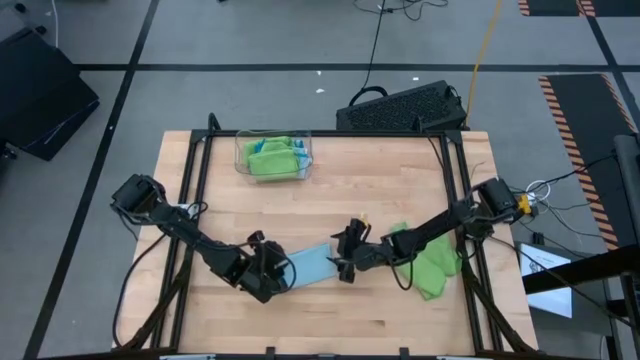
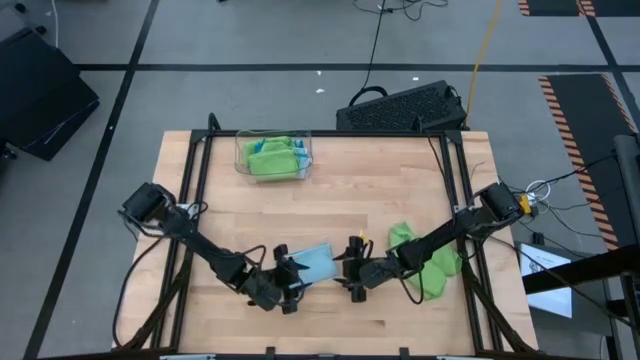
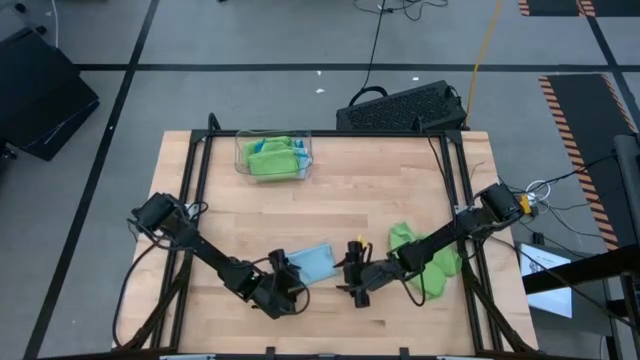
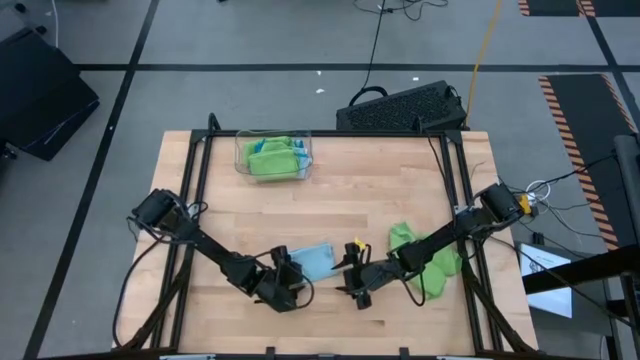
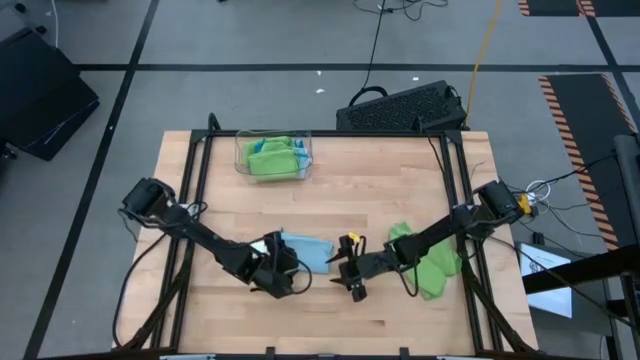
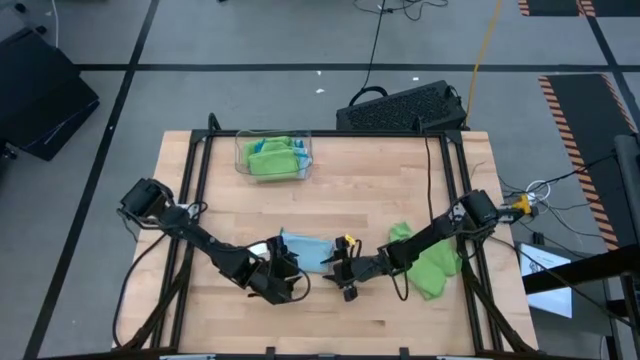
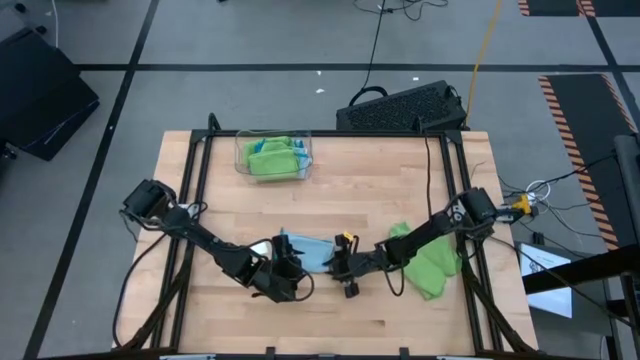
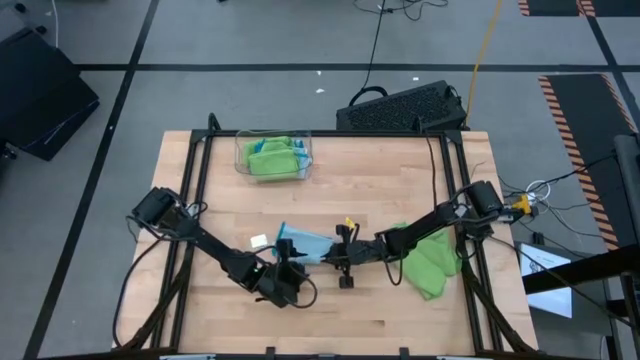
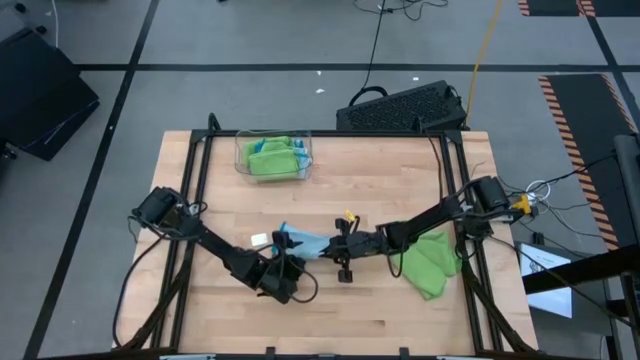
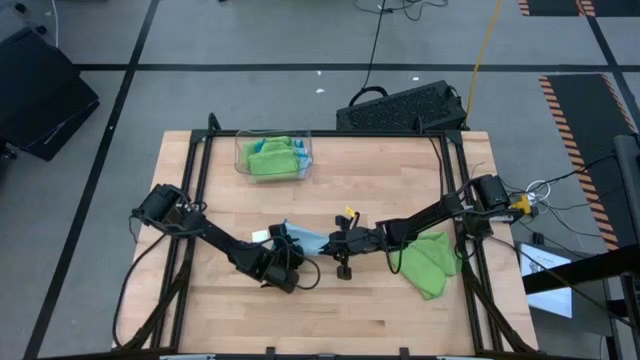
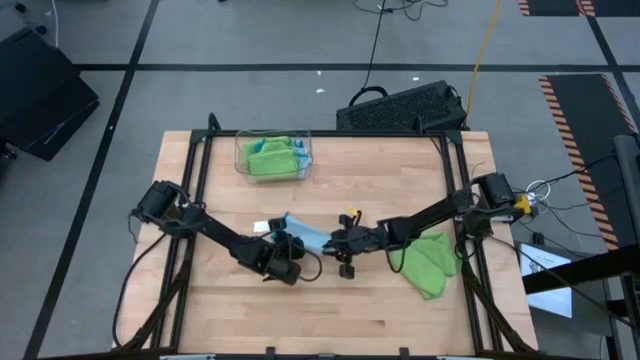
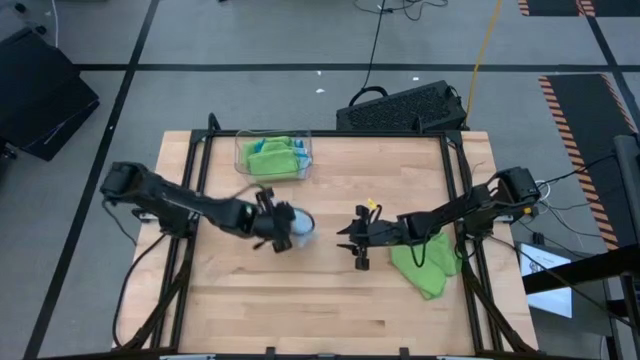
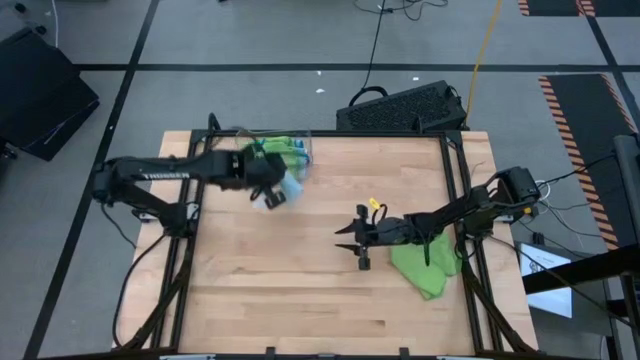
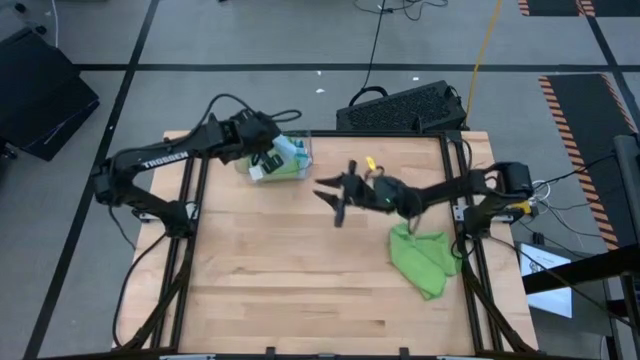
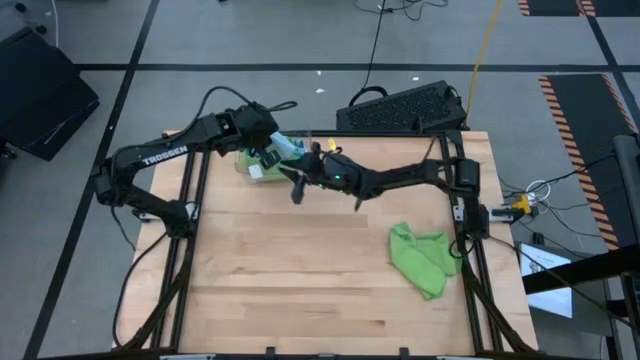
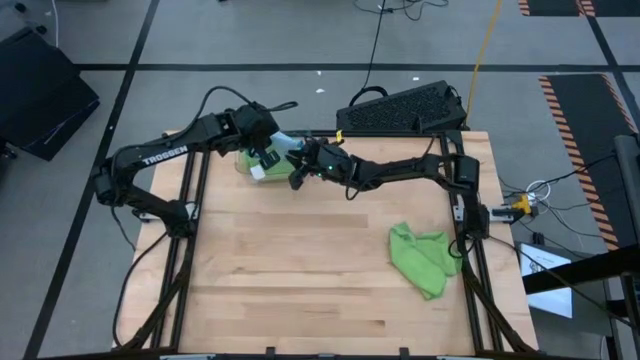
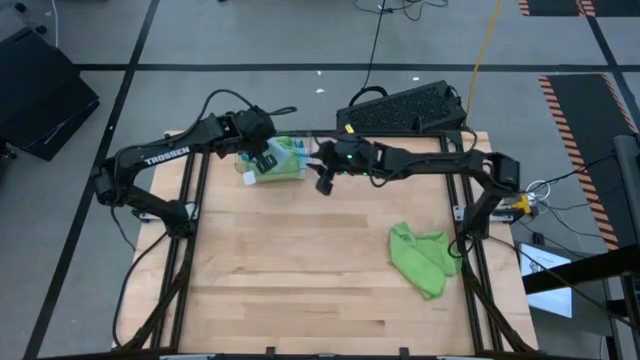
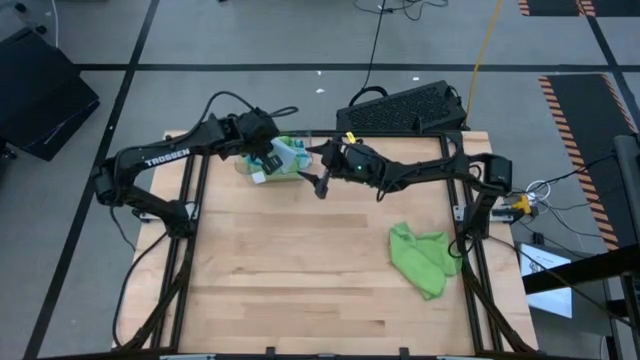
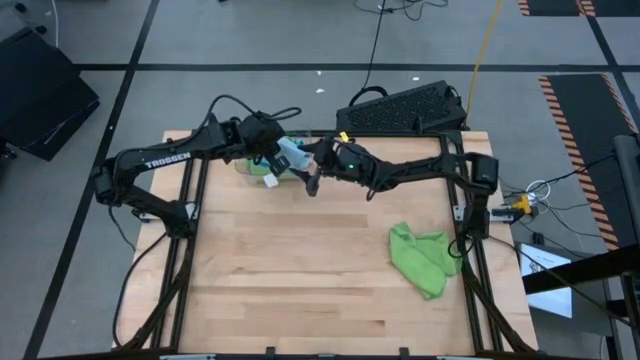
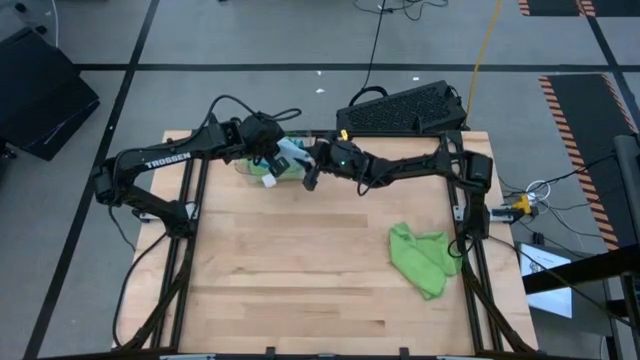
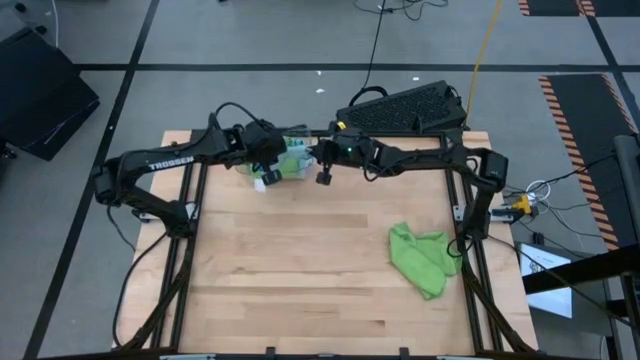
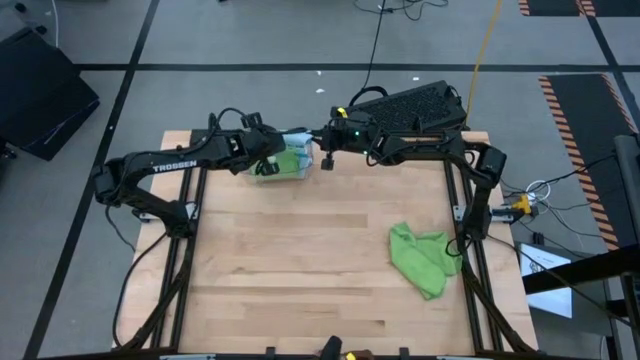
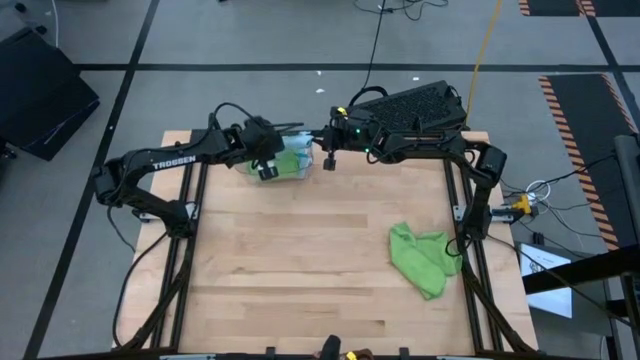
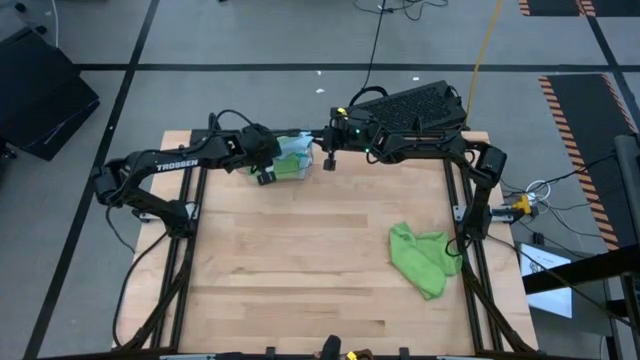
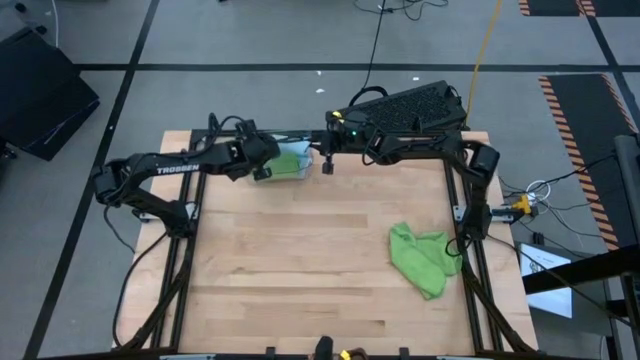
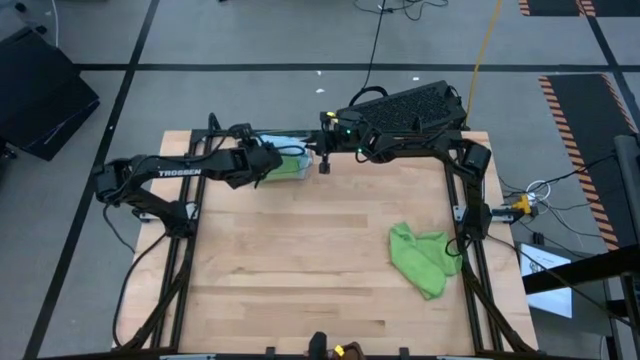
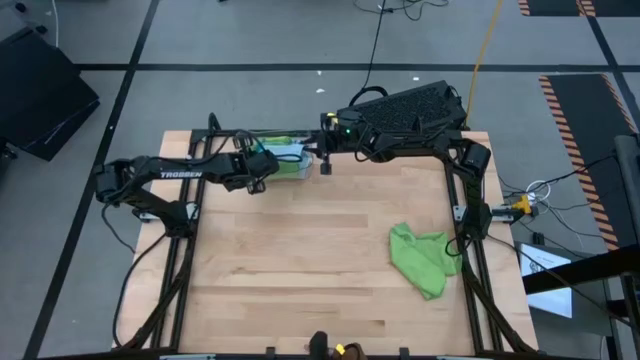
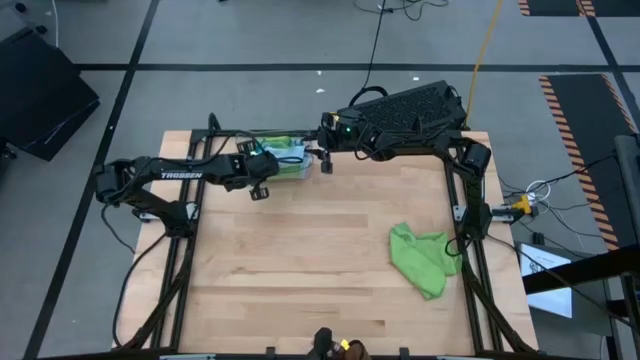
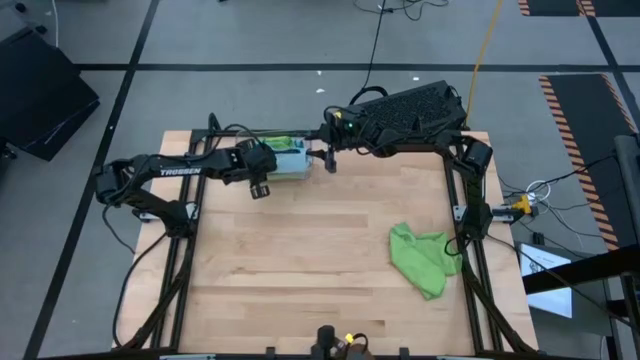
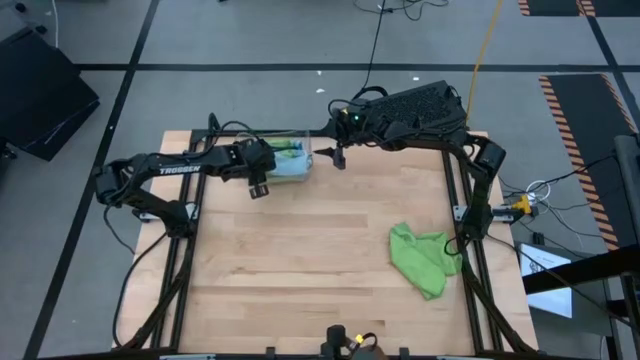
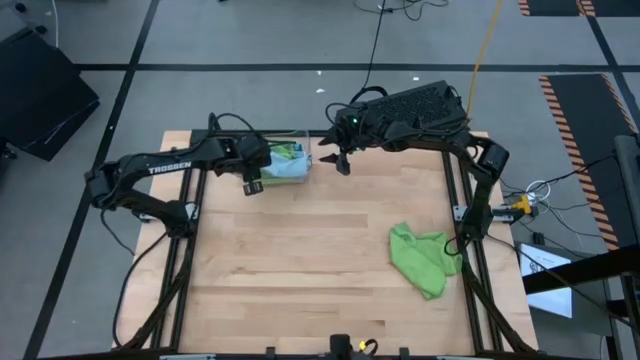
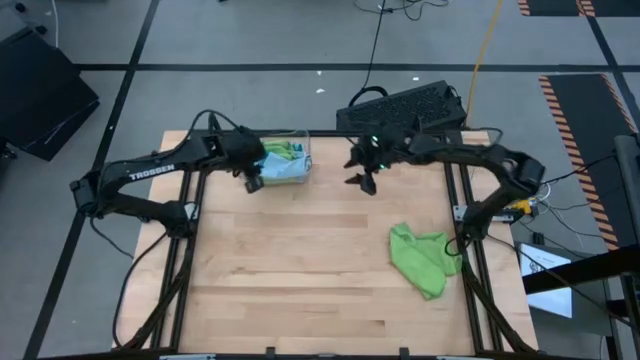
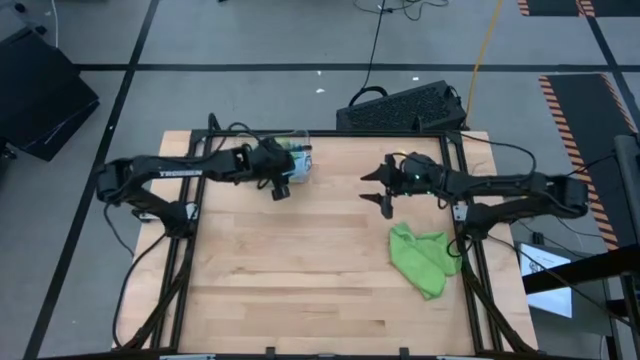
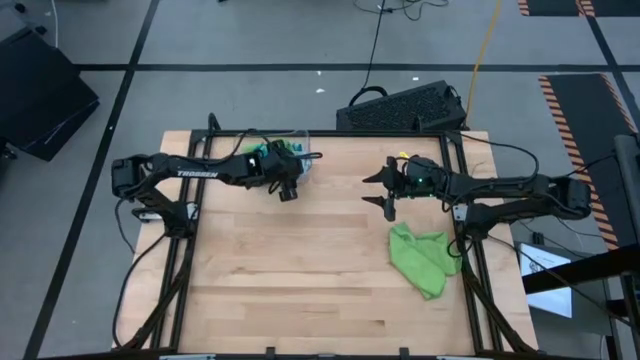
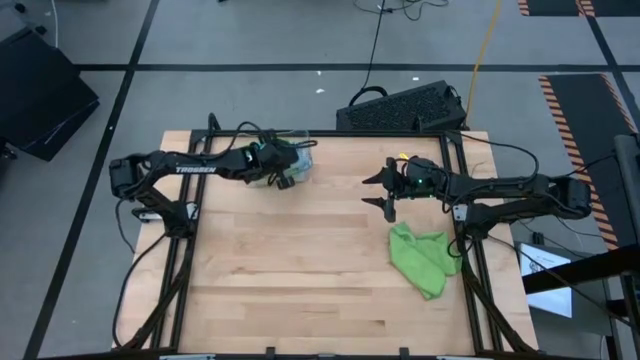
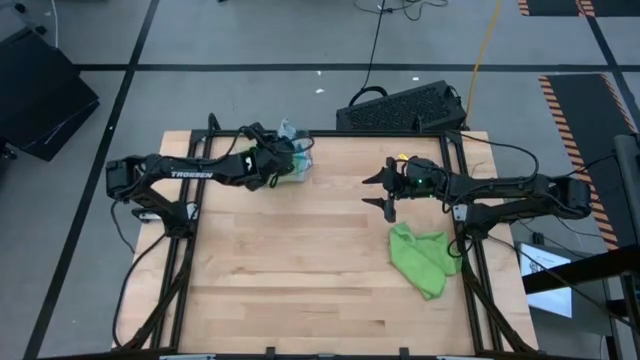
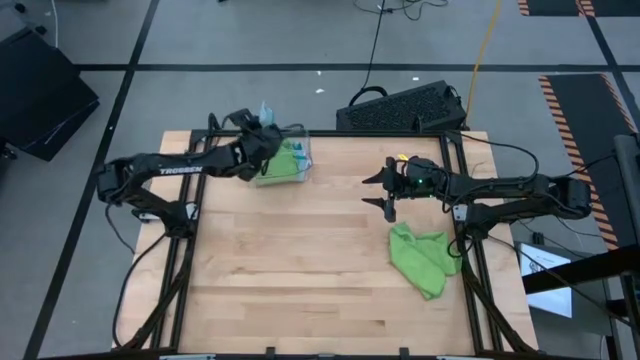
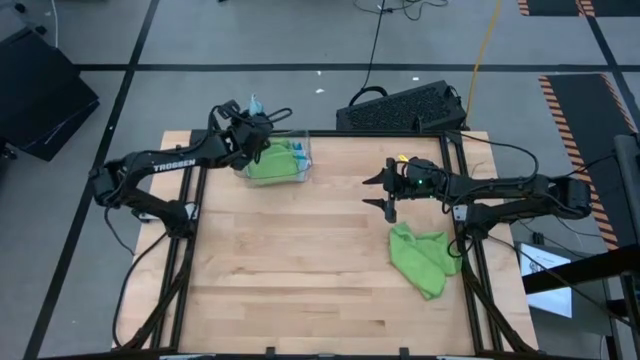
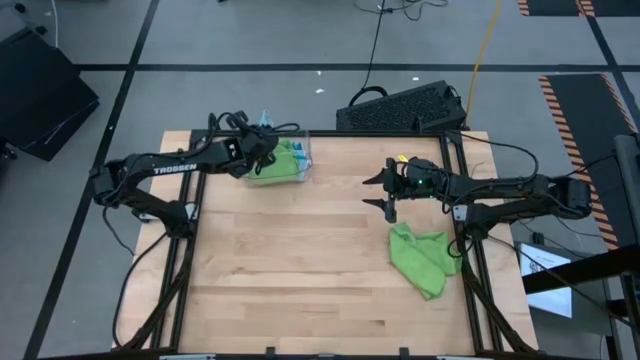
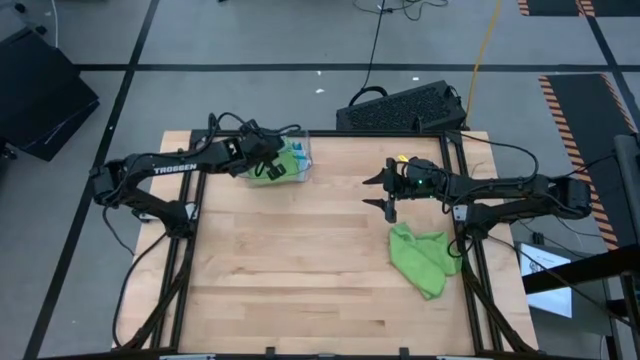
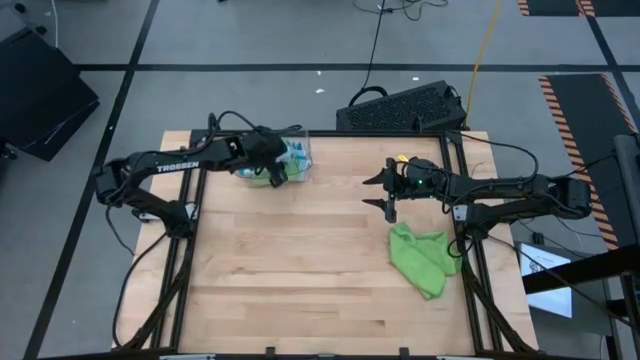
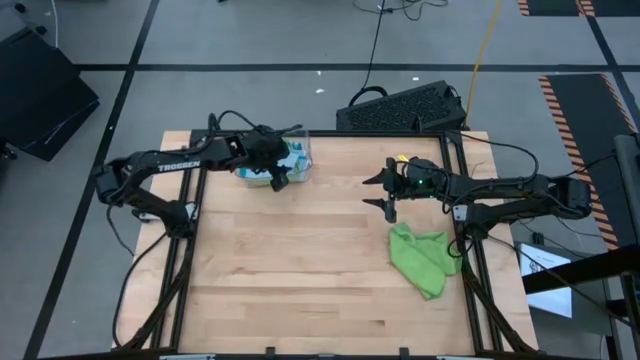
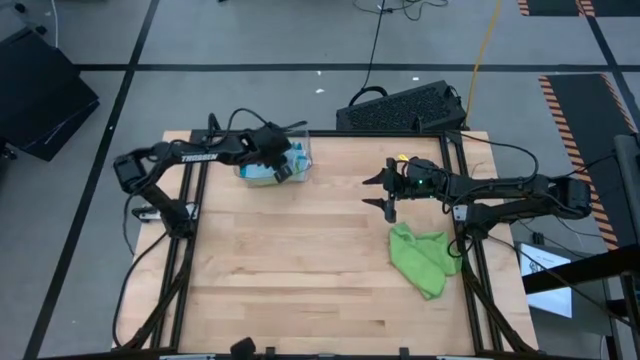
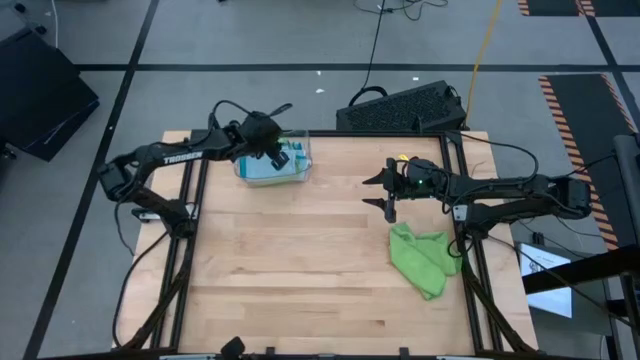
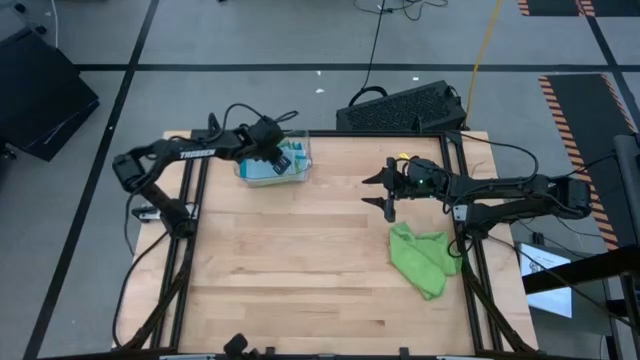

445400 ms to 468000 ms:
Task: Fold microfiber towels
Put the blue microfiber cloth into the bin
